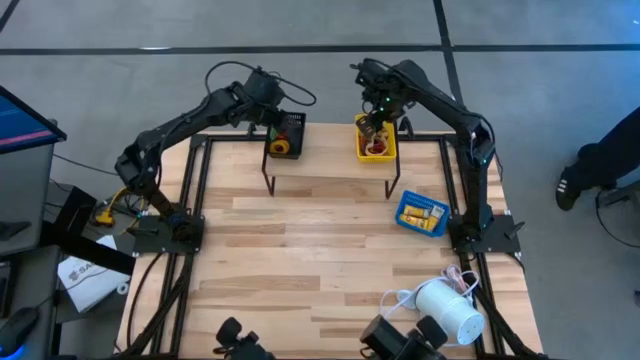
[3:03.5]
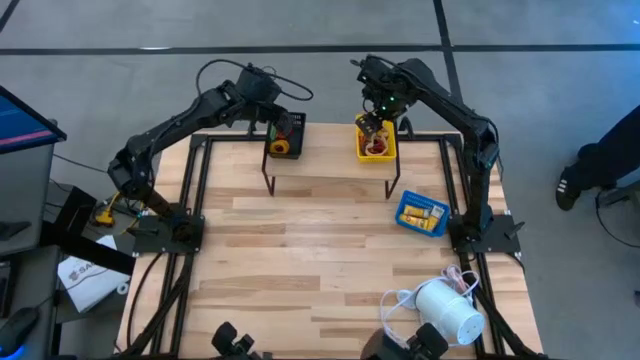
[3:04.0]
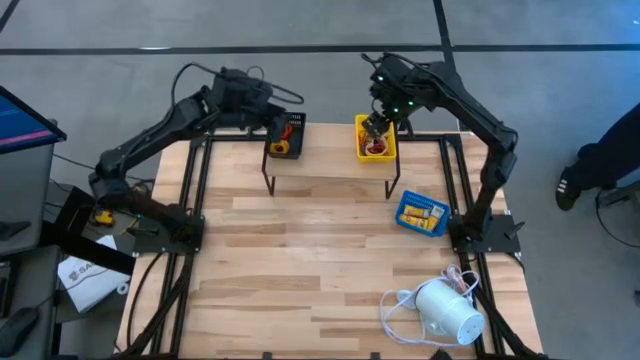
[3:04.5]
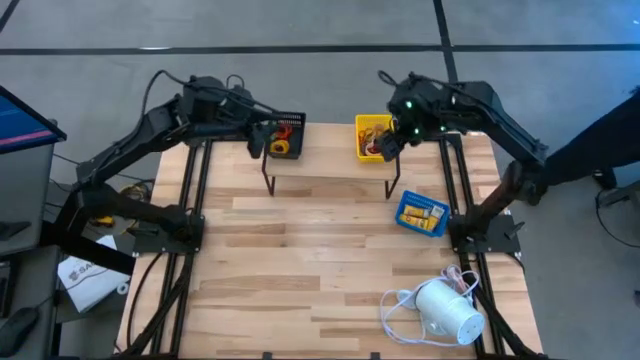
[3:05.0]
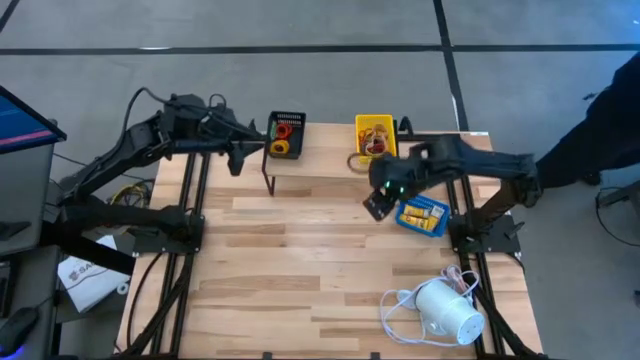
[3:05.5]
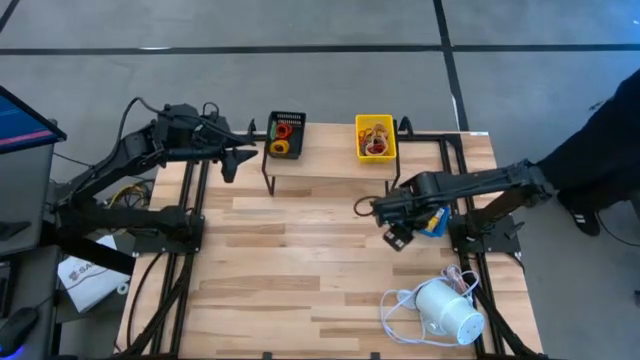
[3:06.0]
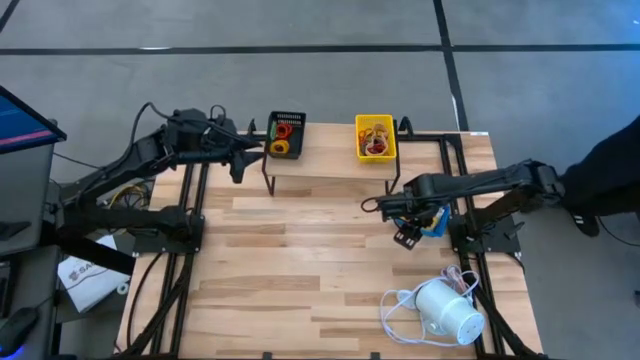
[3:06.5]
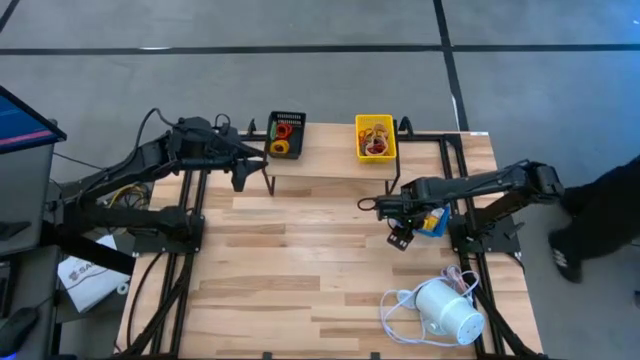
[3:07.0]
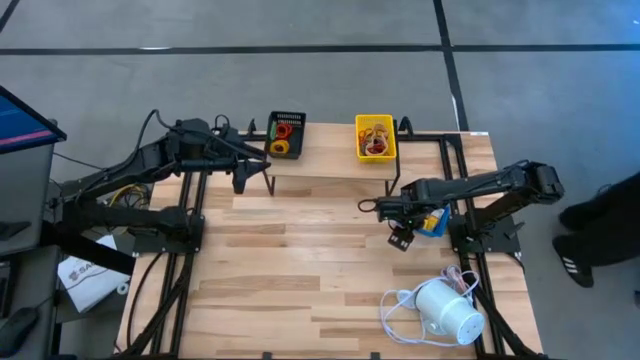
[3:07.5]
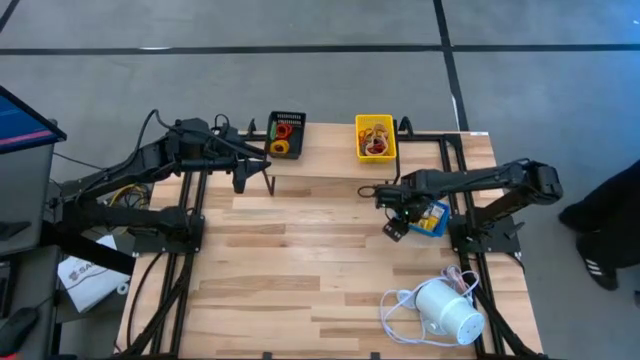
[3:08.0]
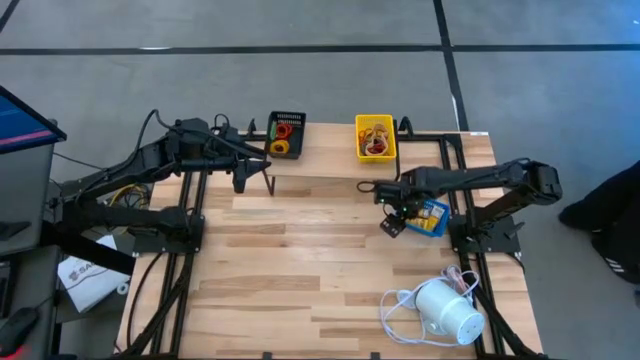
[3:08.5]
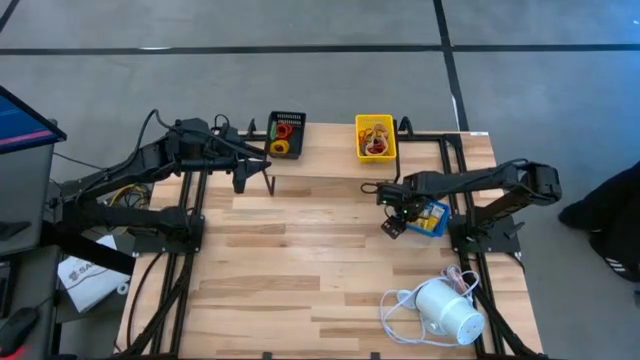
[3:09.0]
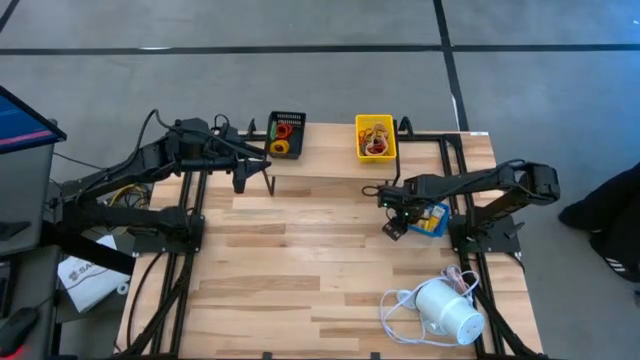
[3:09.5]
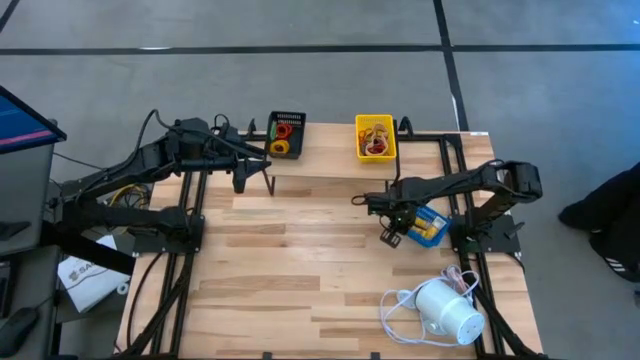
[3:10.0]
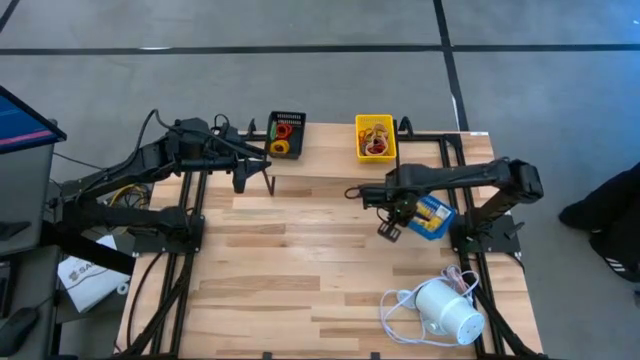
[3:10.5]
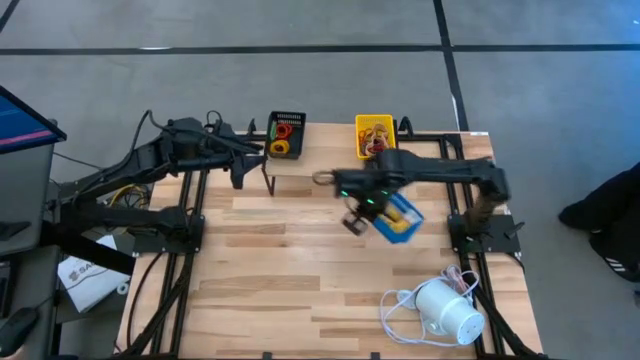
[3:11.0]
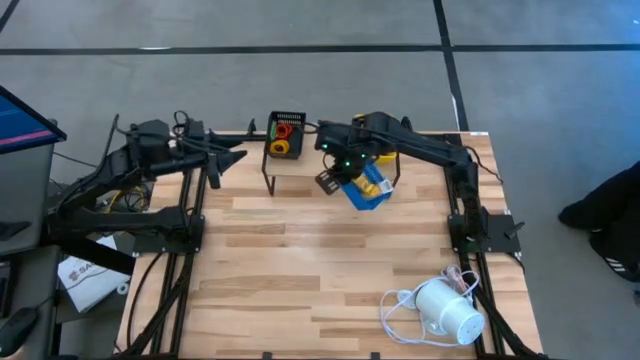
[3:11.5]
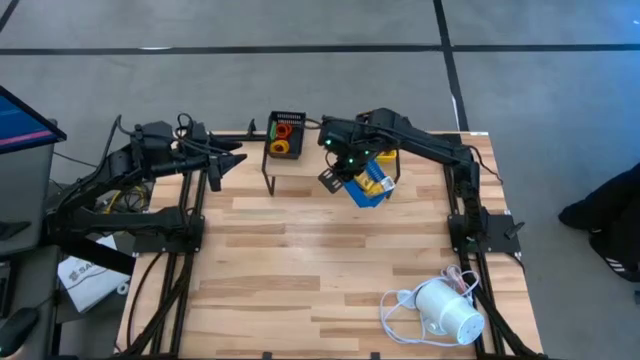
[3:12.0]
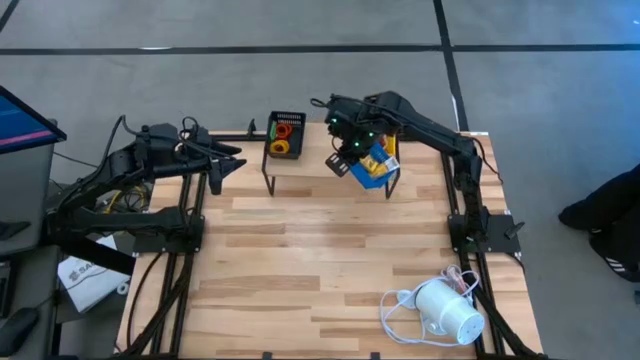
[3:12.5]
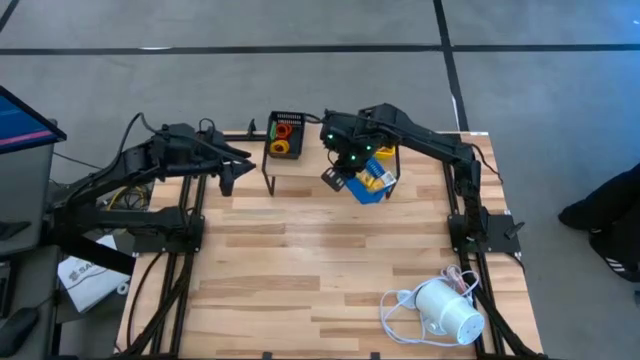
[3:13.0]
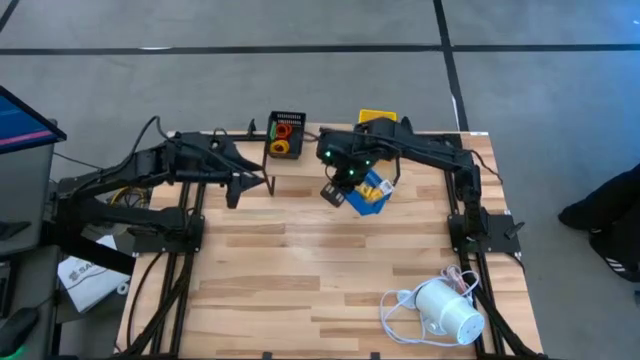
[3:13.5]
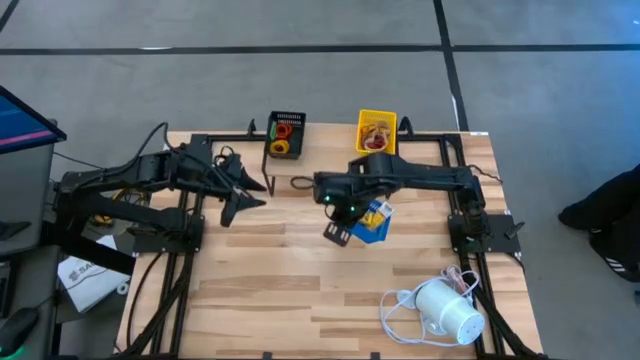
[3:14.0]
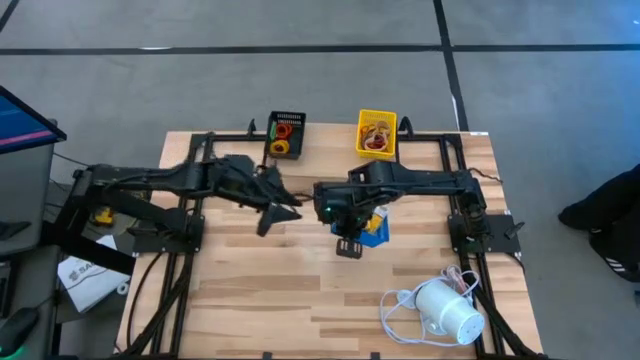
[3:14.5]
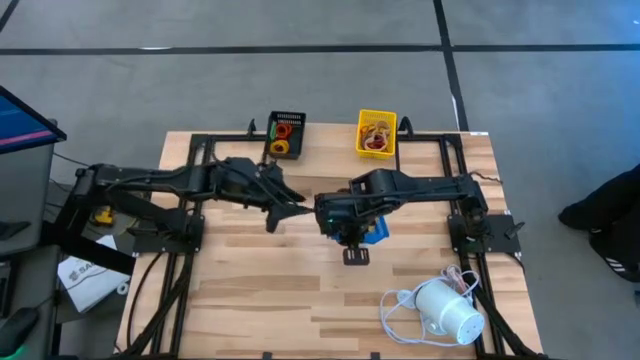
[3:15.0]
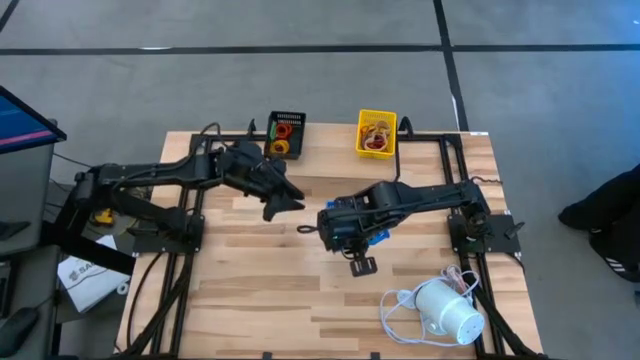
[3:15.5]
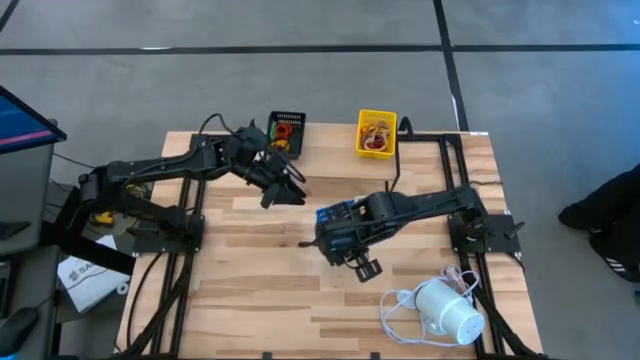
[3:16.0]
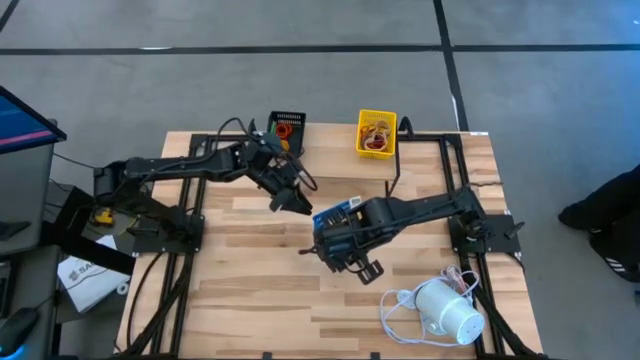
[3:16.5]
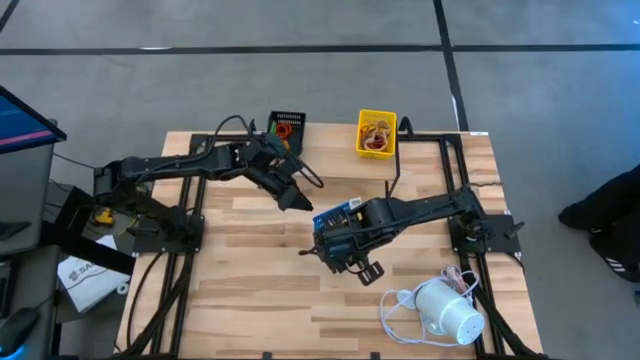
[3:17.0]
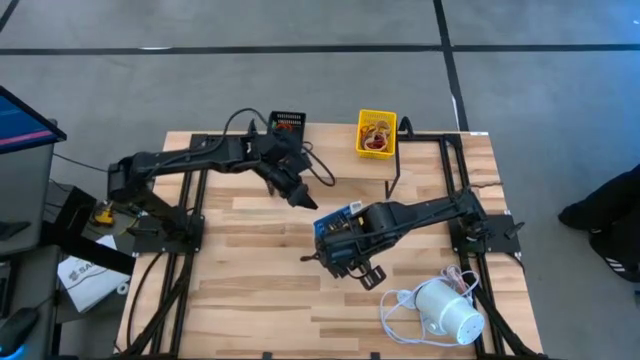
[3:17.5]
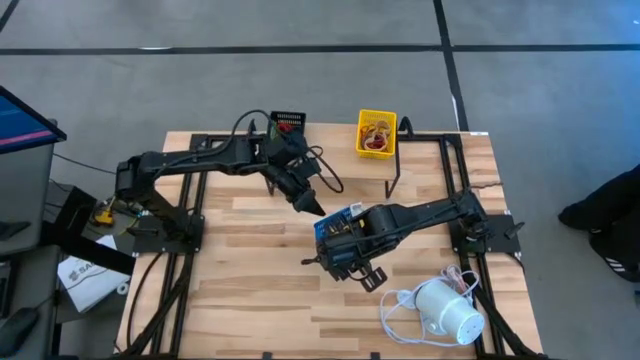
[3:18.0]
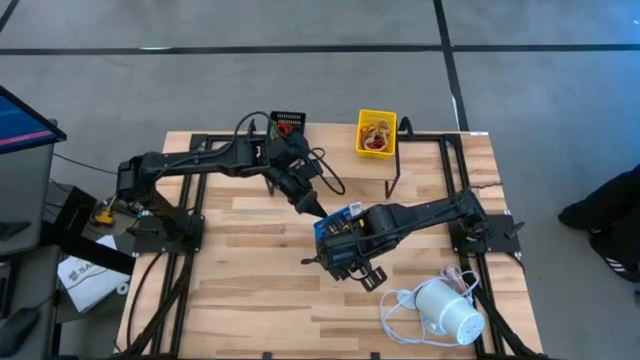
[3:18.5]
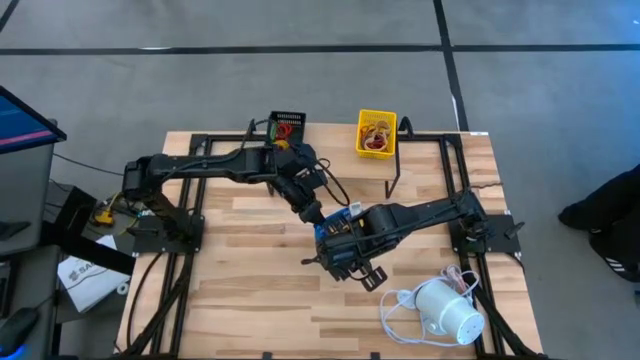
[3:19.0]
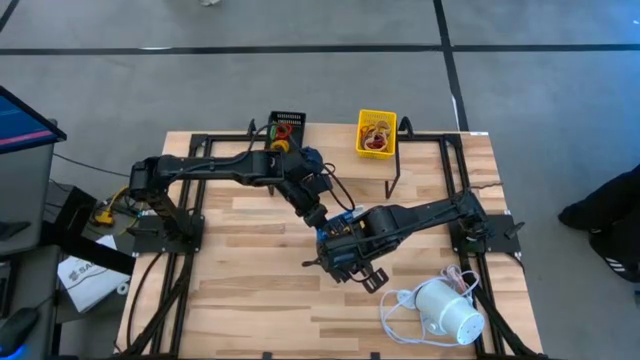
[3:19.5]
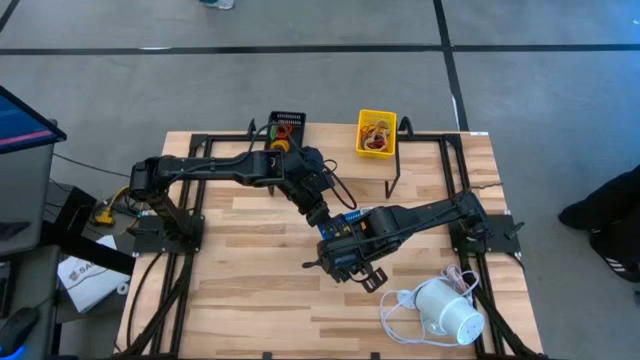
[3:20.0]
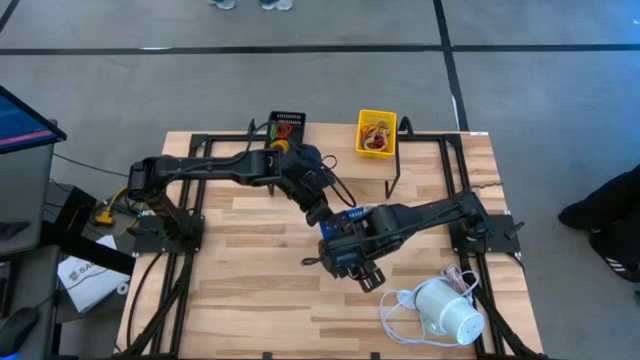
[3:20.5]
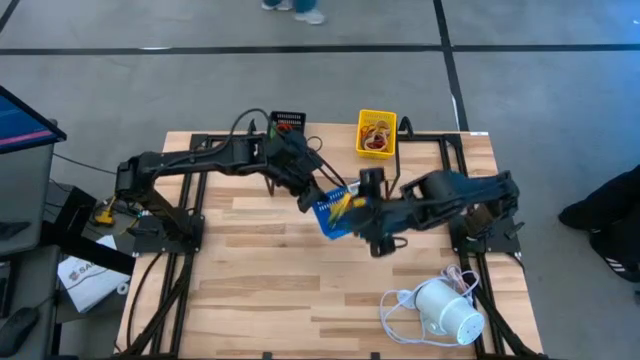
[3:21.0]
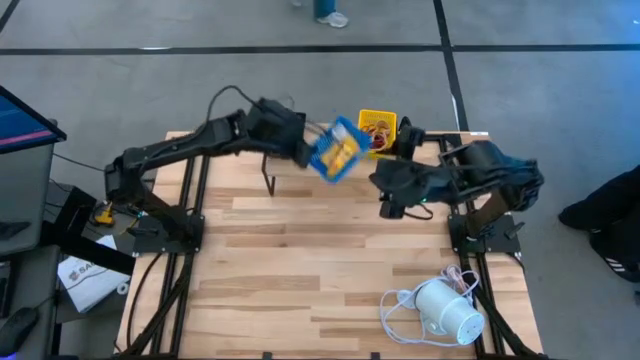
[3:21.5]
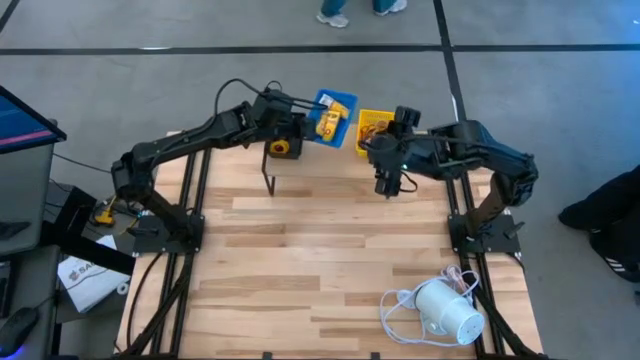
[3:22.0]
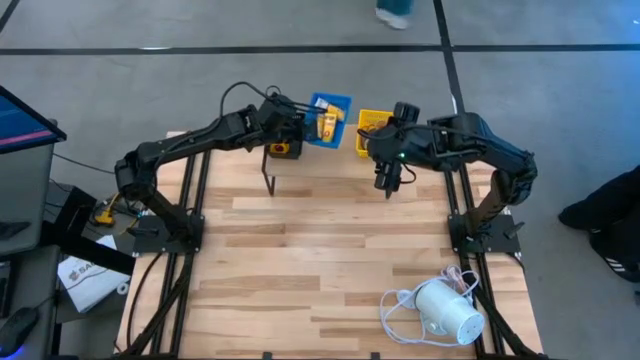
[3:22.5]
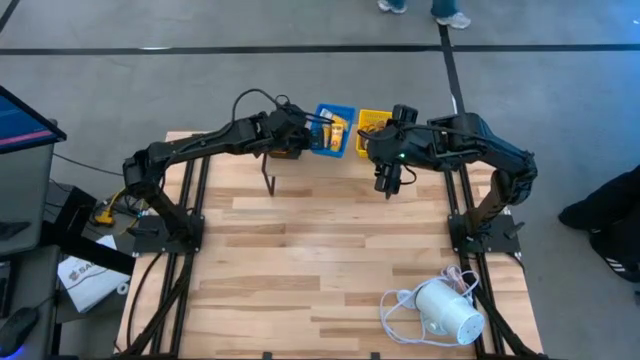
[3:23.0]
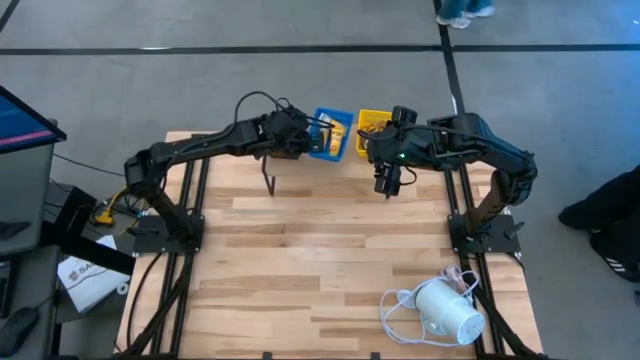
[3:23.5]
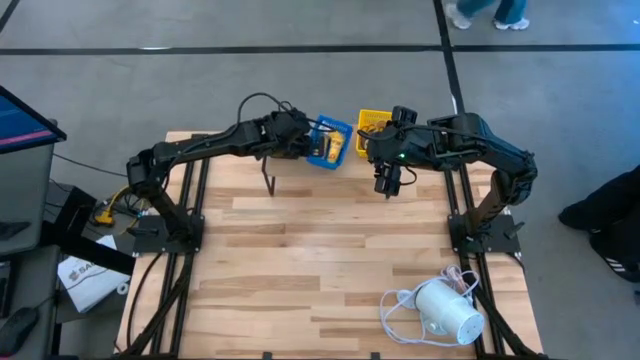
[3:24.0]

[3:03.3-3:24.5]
Task: Pick & Place Office Desk Supplies
Put the blue bin on the shelf

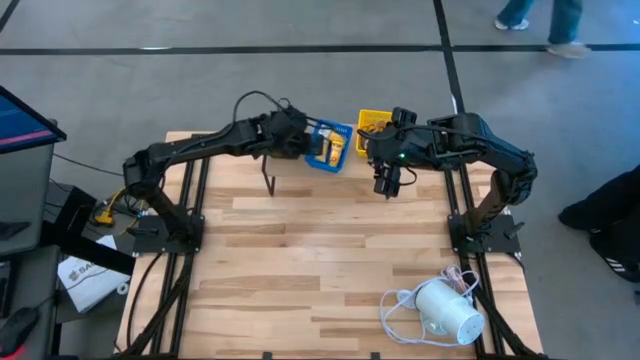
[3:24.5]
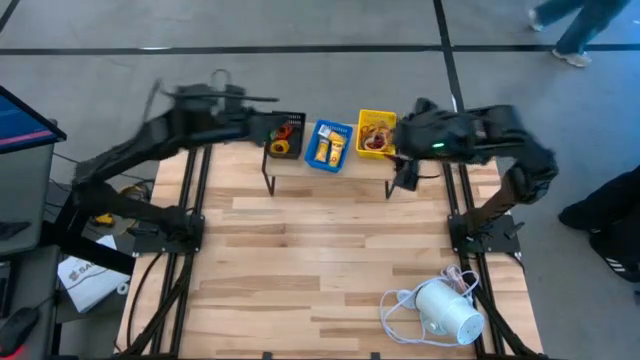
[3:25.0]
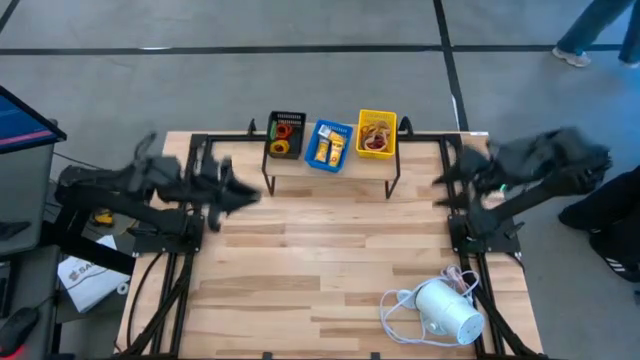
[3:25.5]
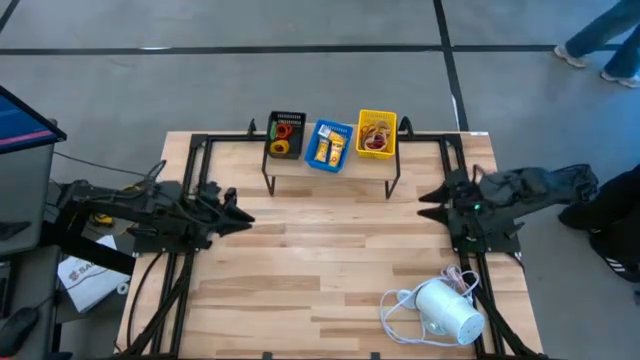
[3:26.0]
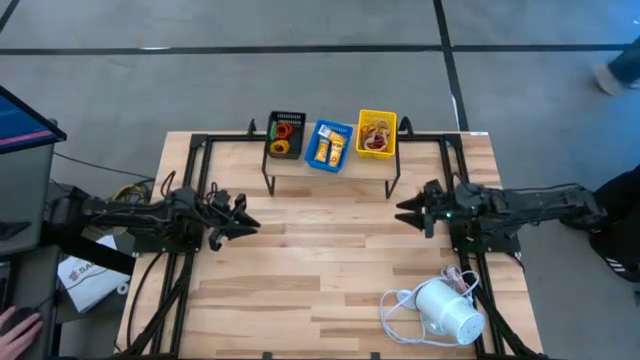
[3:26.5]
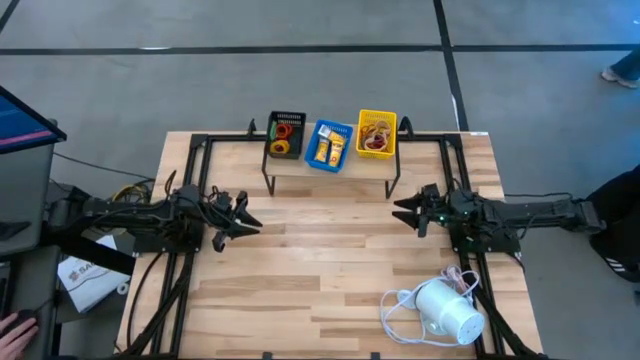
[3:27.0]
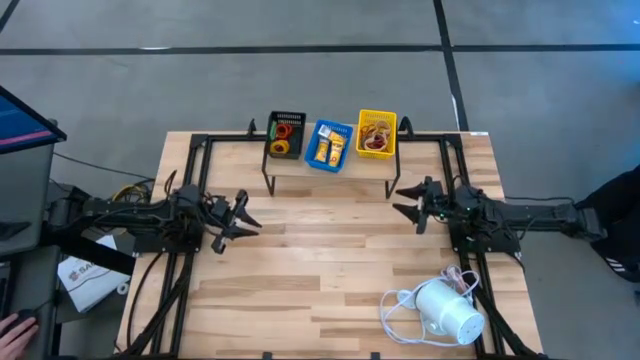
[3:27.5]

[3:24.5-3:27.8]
Return to Home Position
